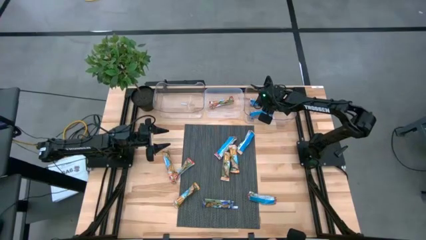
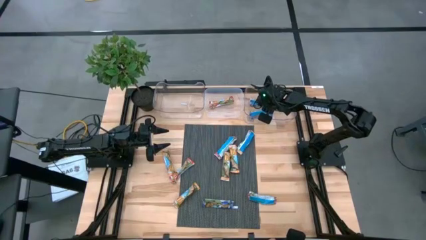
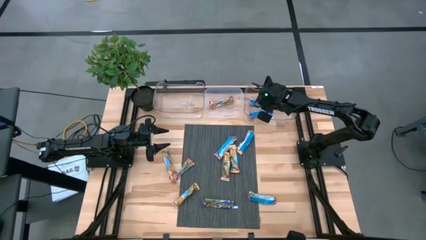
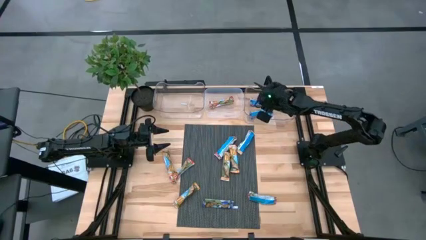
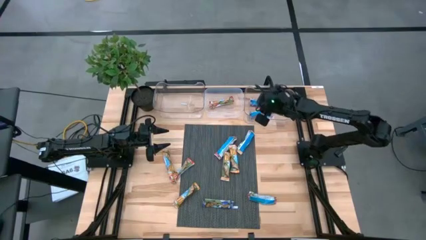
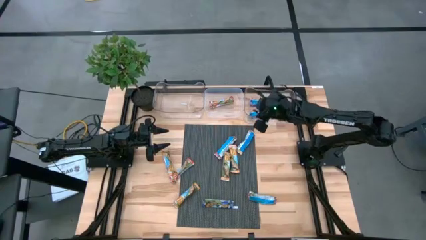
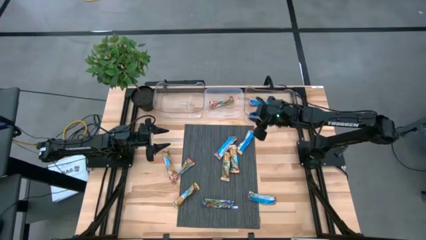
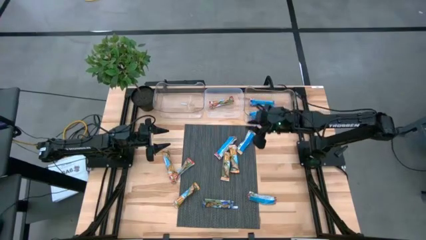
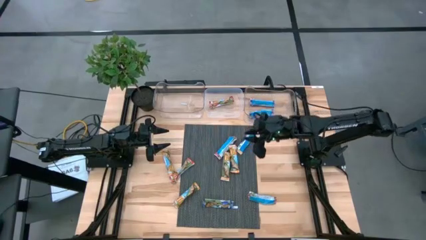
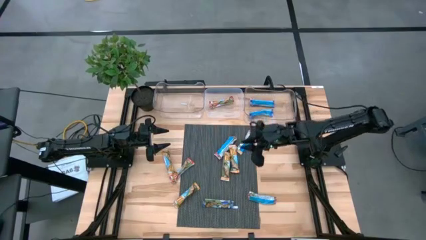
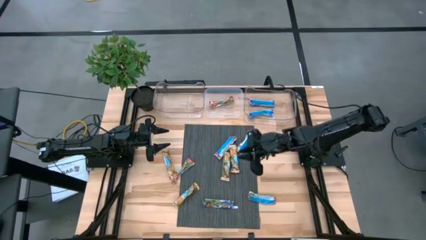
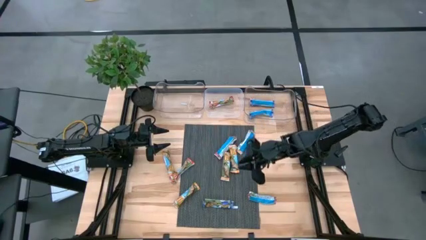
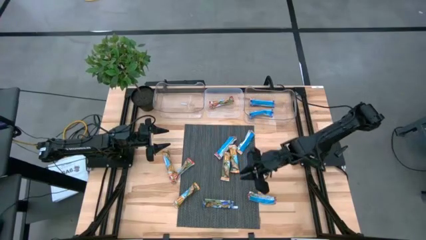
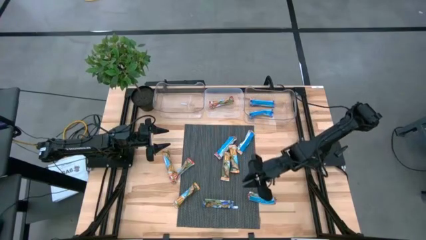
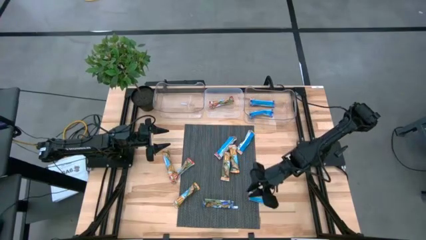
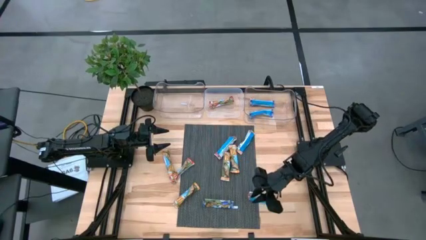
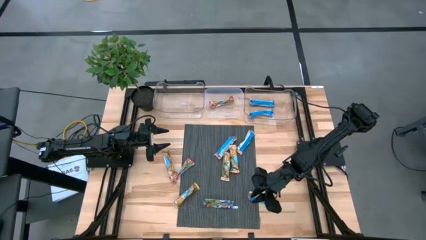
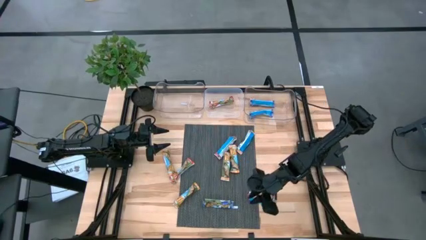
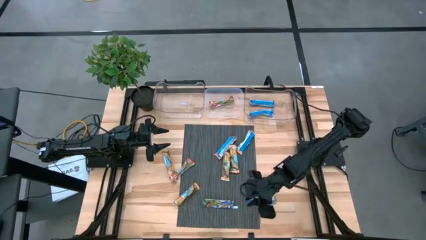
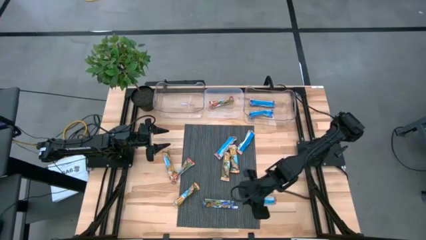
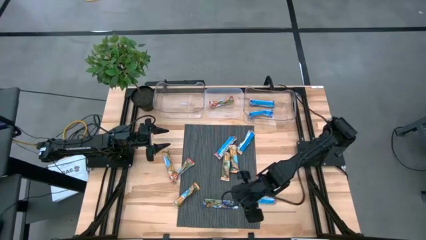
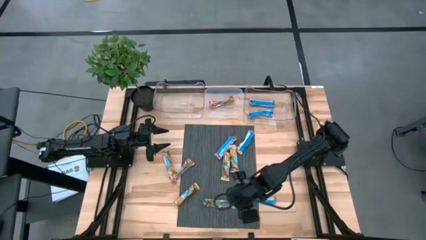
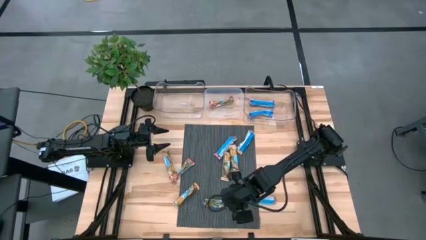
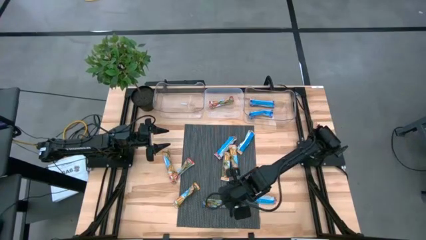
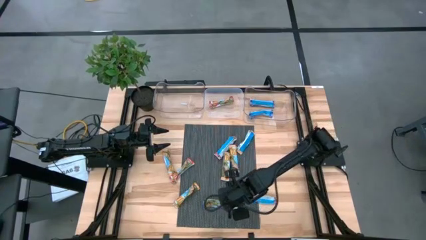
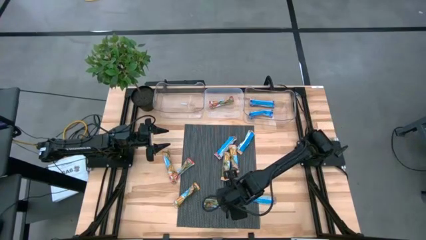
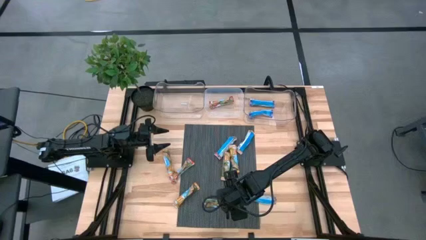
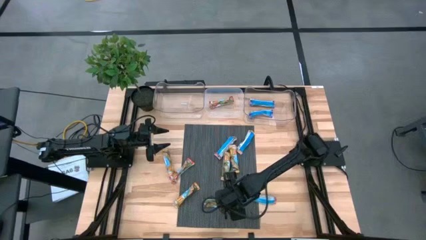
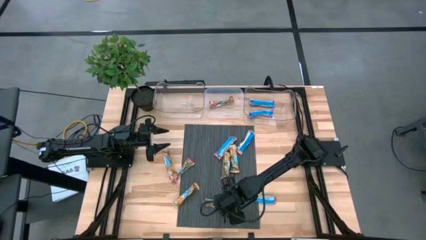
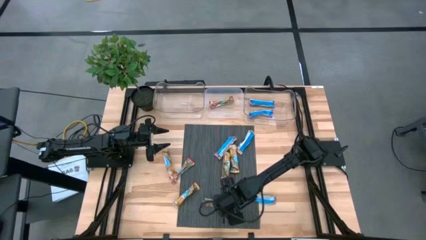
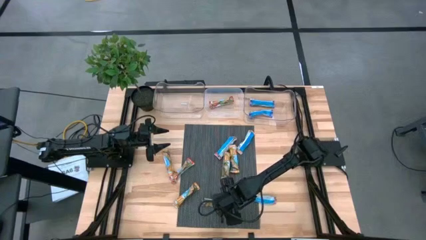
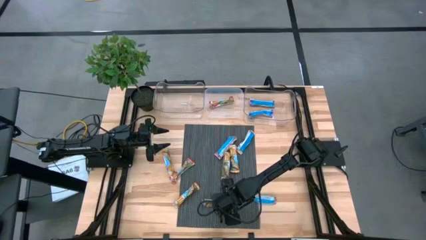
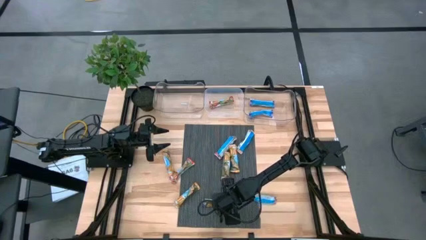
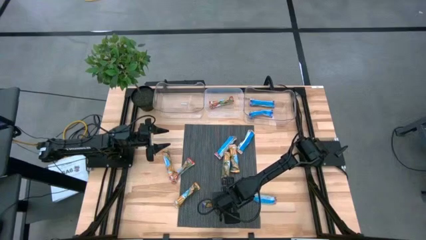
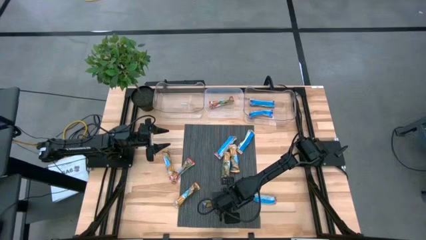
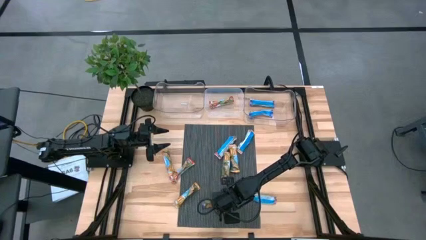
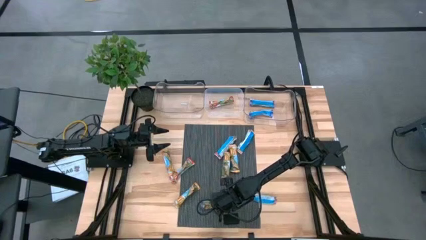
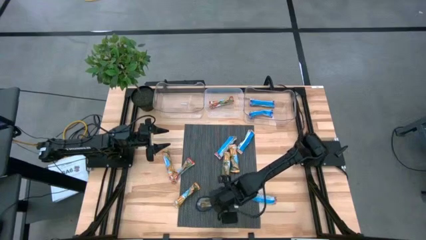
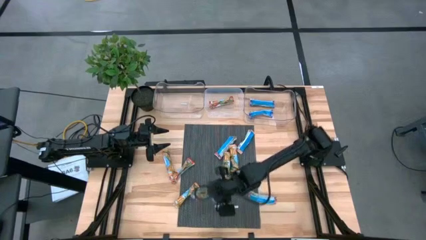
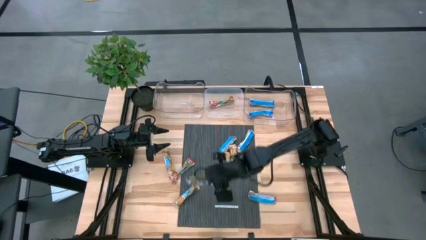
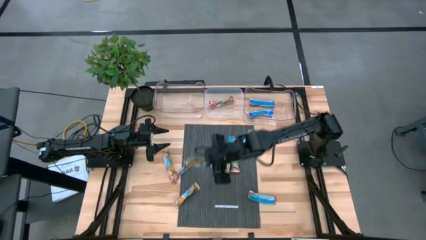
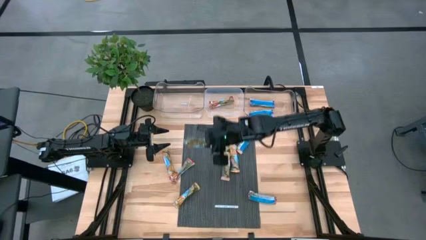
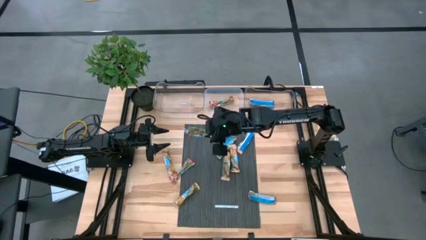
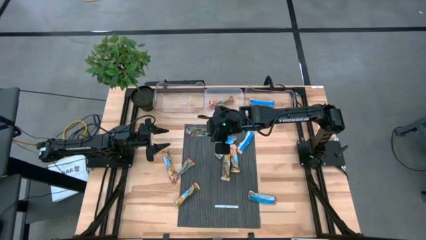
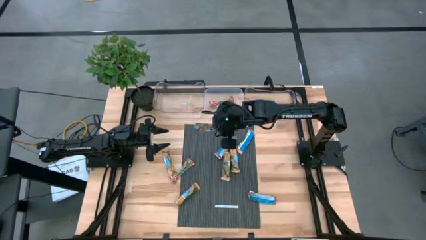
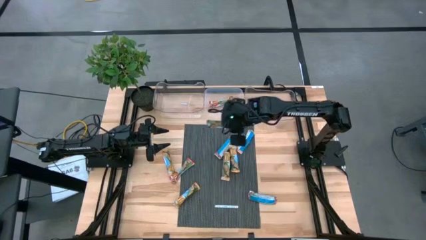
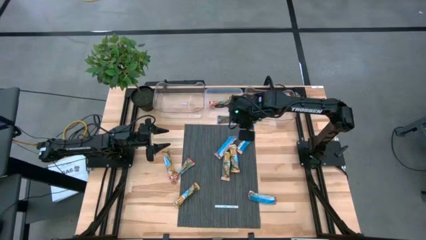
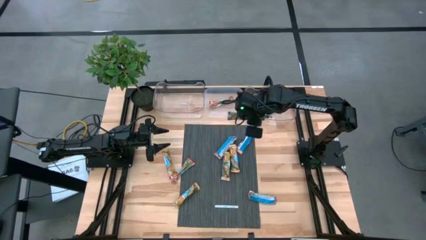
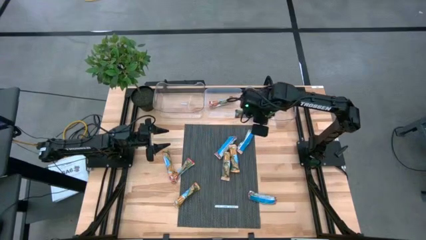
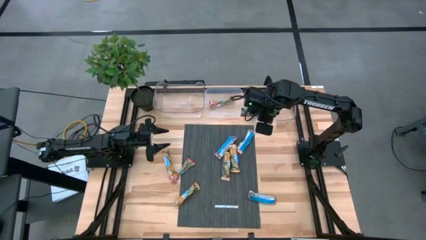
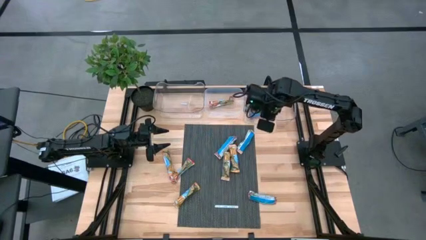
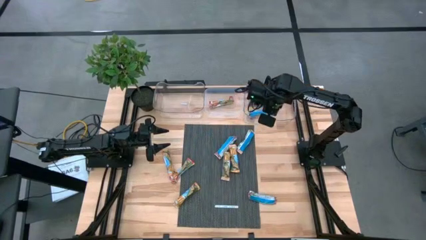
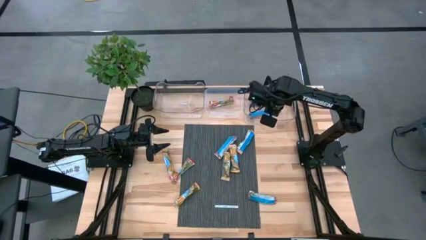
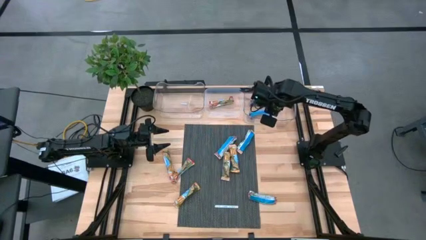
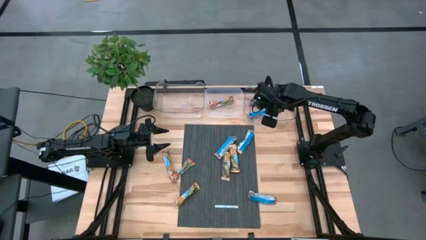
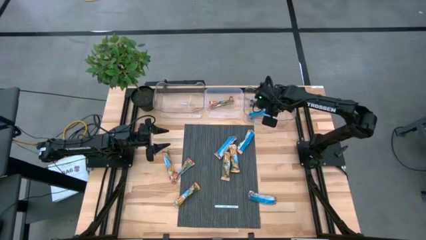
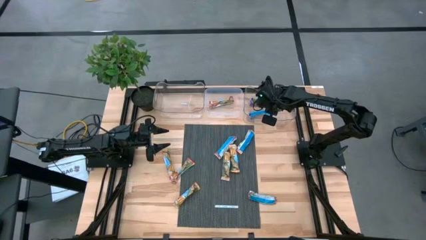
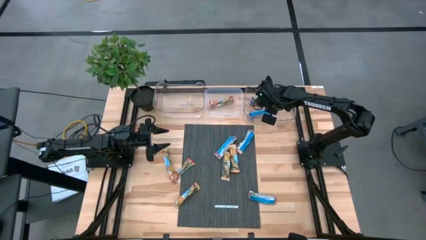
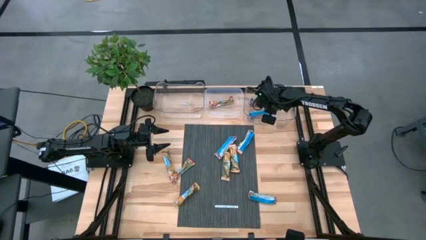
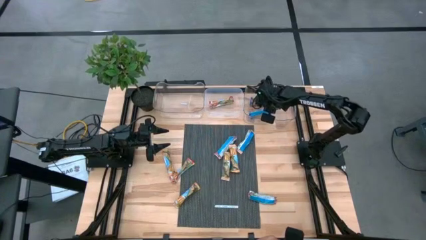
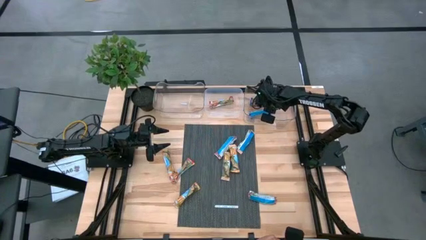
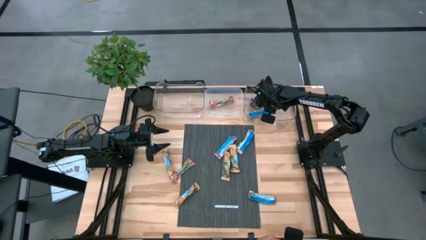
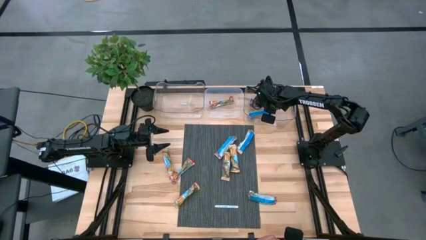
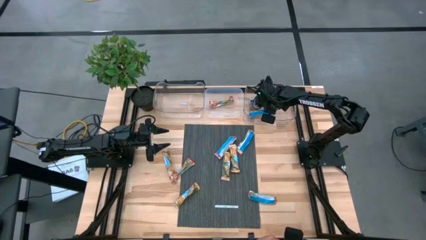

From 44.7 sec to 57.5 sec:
Task: Pick and place Granola Bars by type
Put the blue granola bar into the right transparent bin

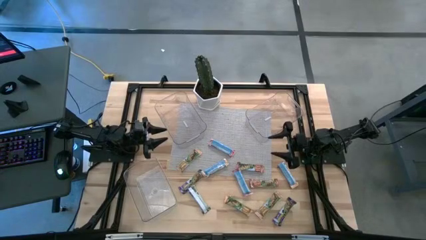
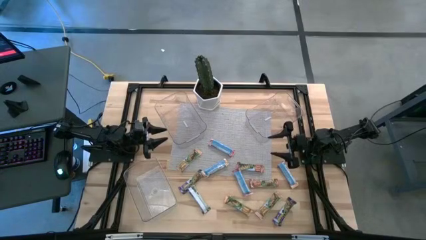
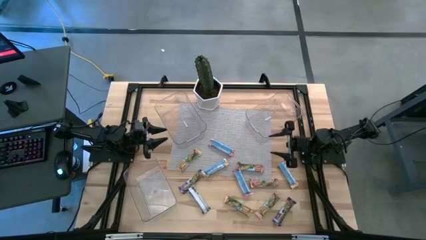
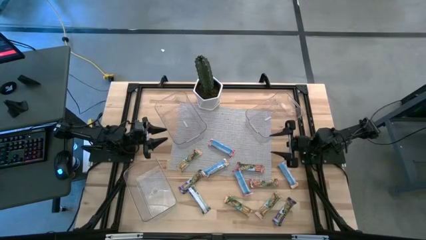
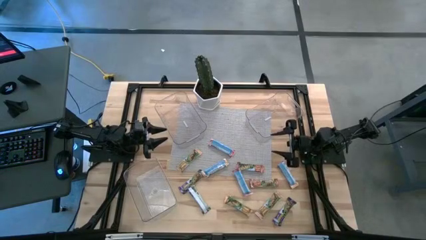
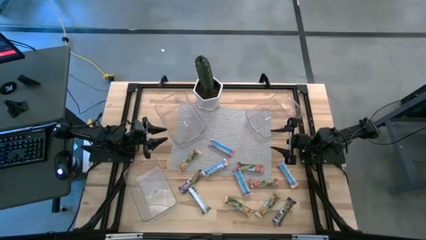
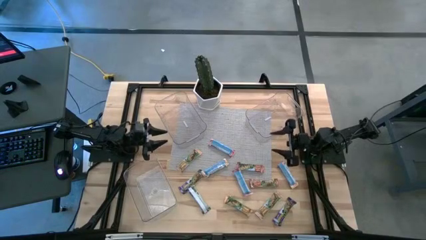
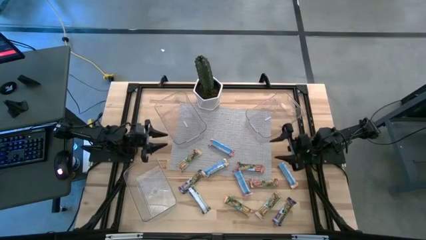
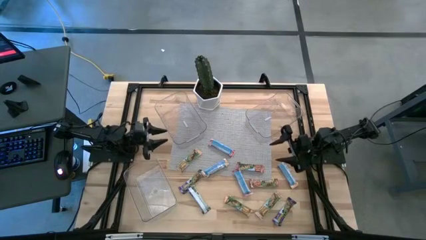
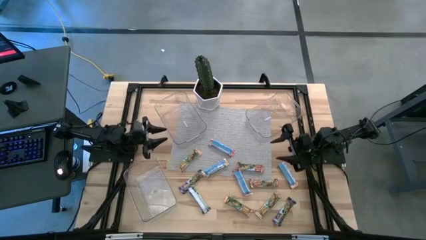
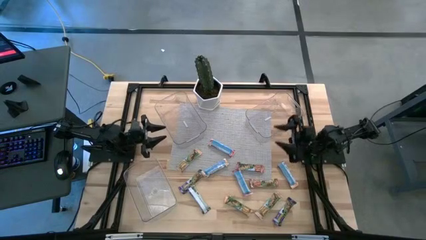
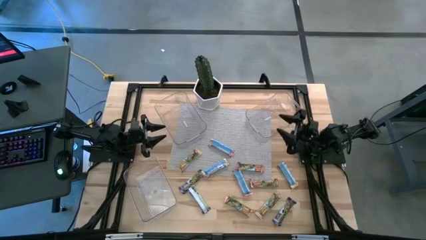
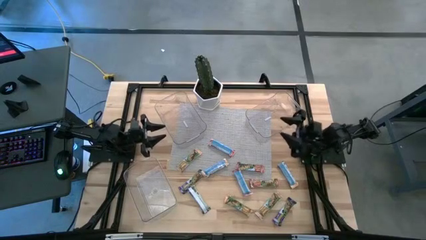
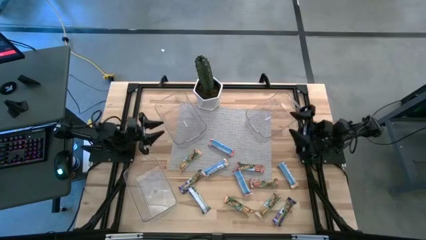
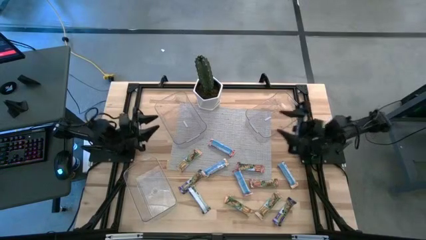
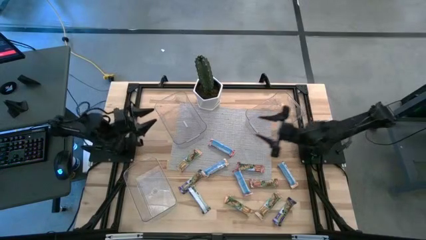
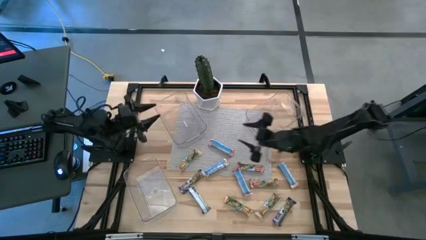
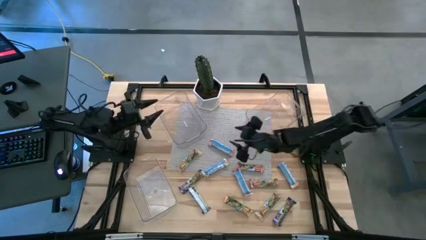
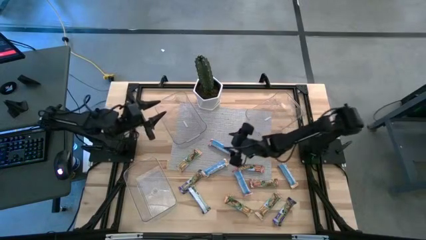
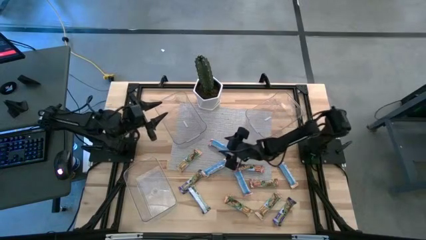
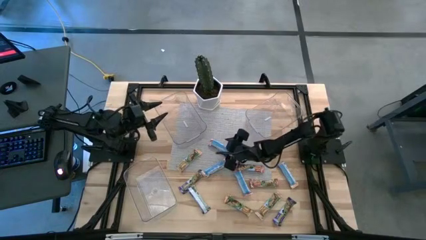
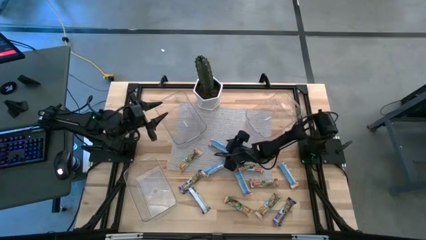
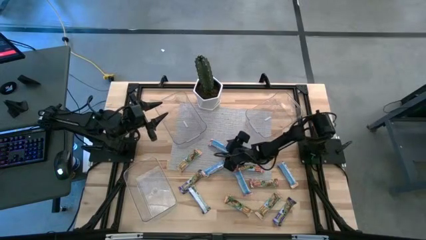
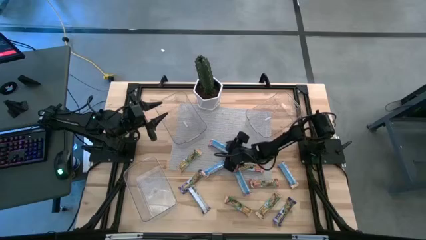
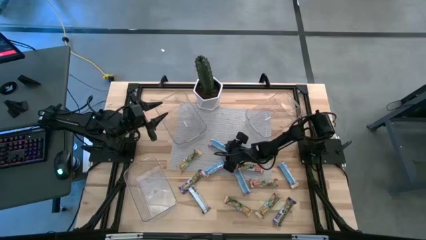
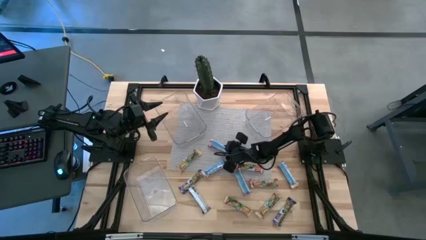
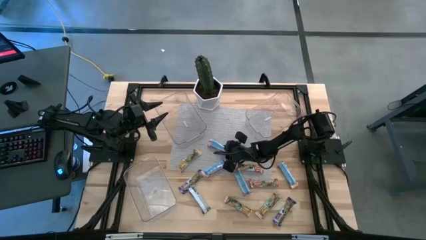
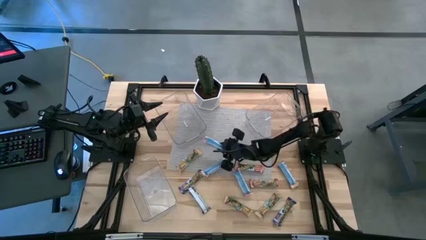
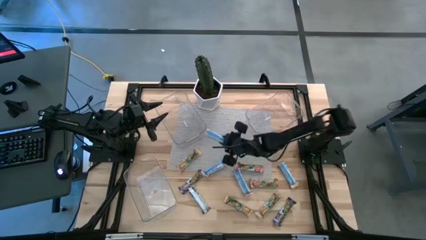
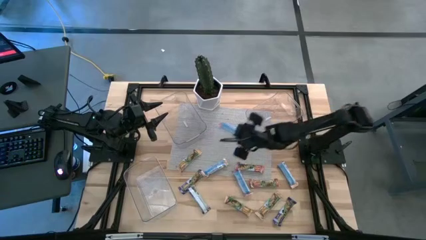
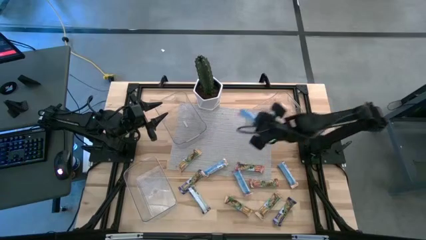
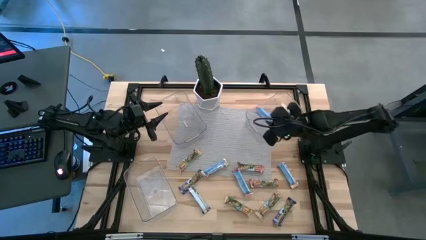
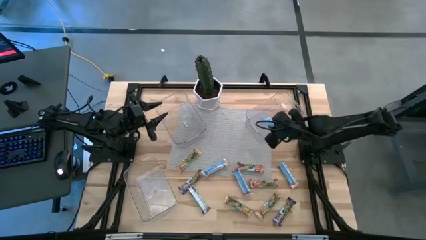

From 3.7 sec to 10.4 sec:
Task: Pick and place Granola Bars by type
Put the red granola bar into the top right transparent bin
